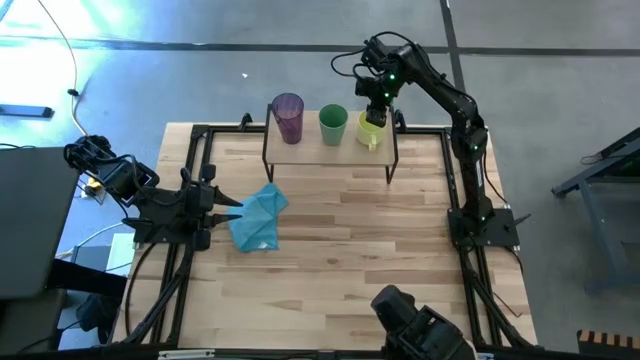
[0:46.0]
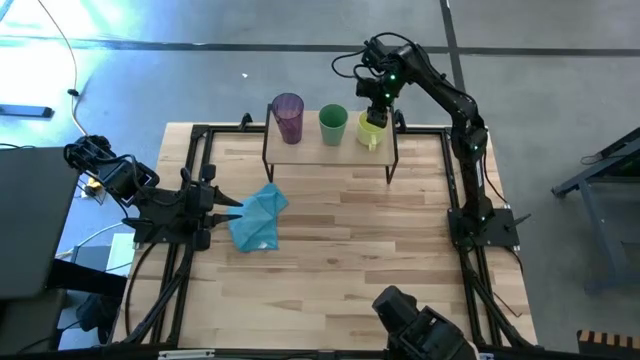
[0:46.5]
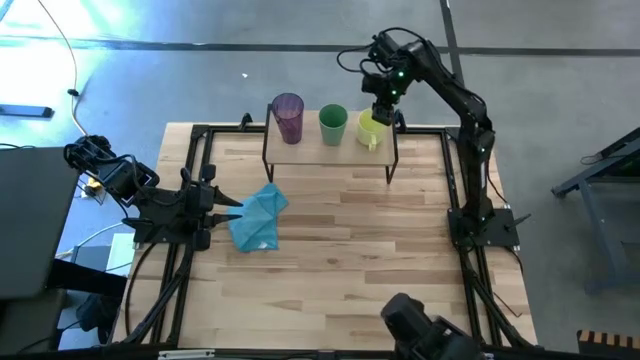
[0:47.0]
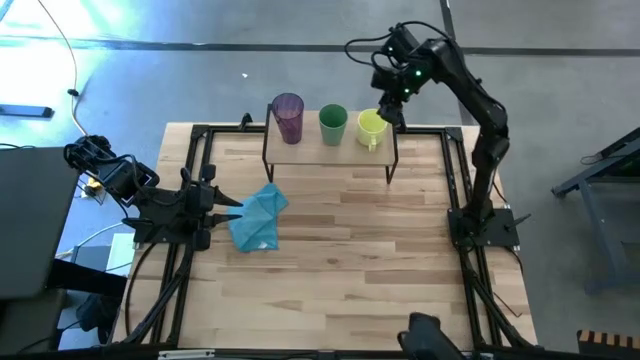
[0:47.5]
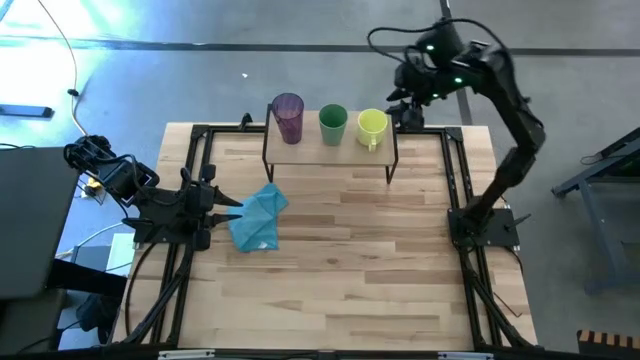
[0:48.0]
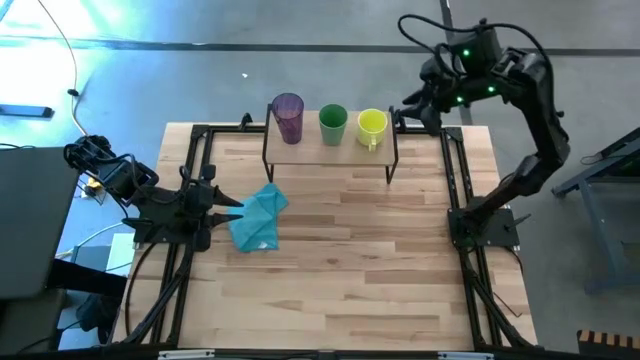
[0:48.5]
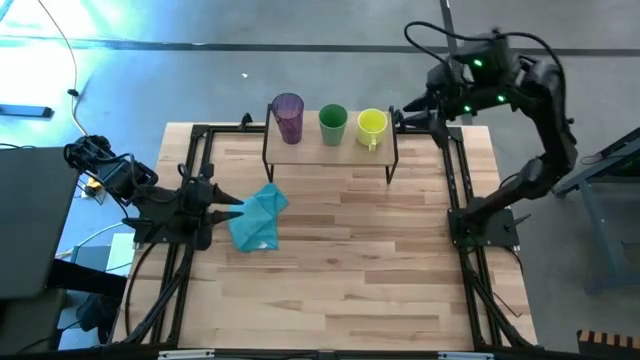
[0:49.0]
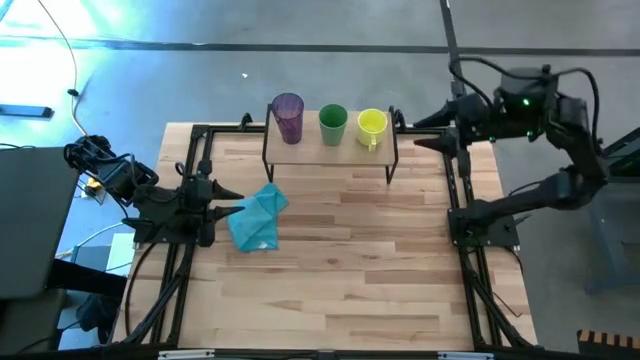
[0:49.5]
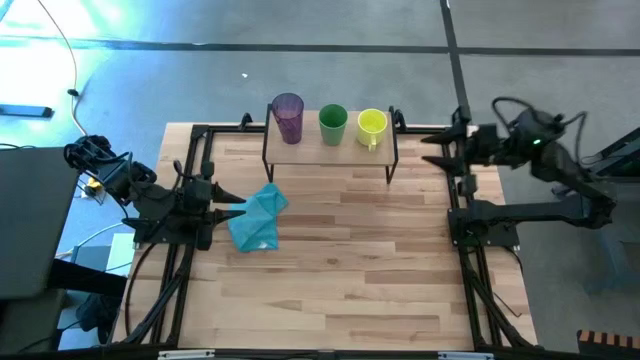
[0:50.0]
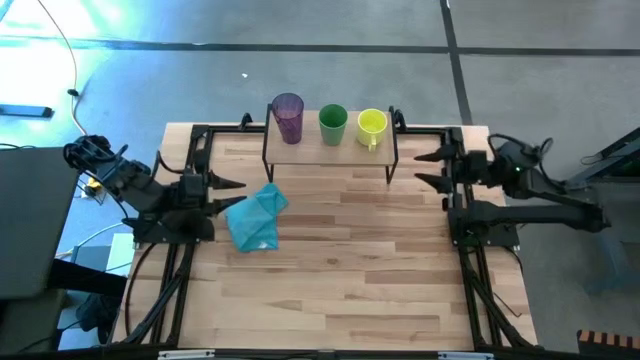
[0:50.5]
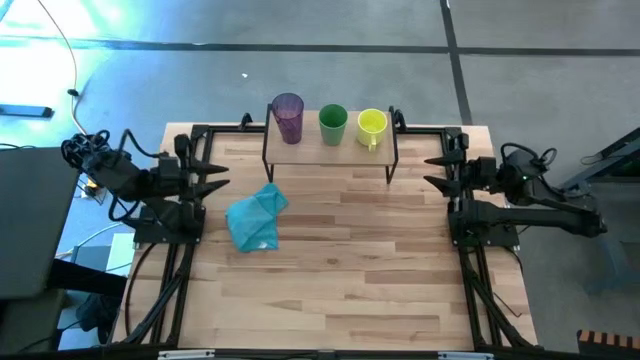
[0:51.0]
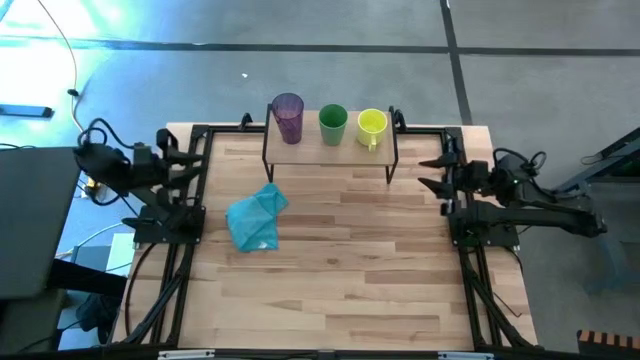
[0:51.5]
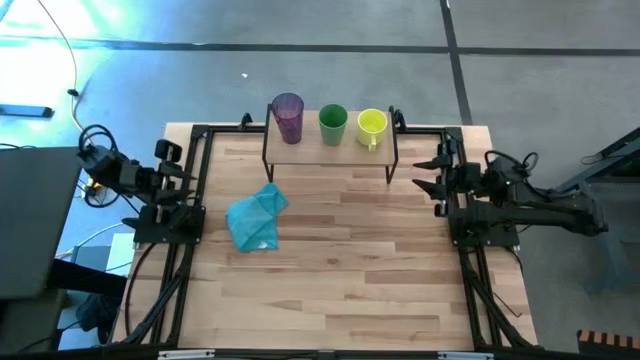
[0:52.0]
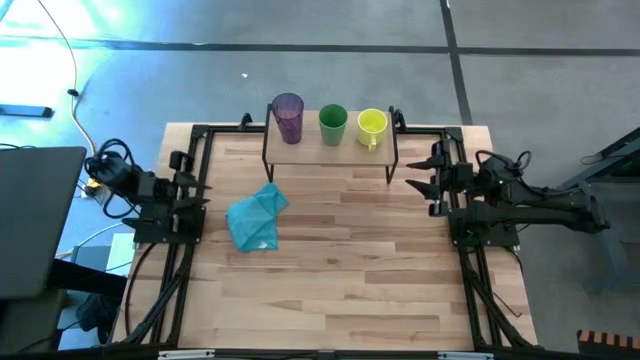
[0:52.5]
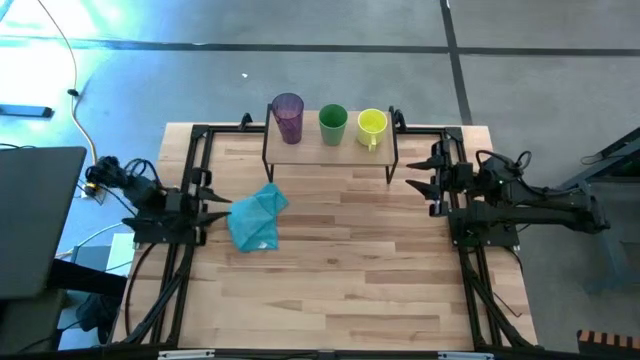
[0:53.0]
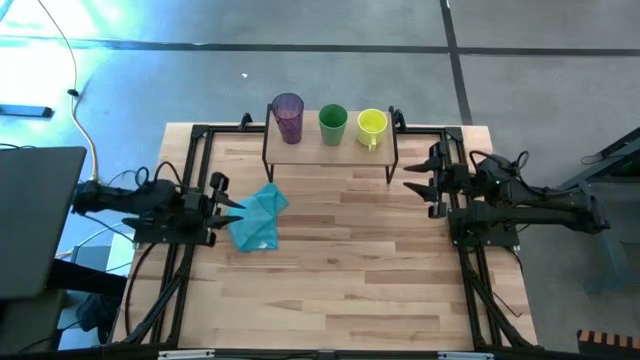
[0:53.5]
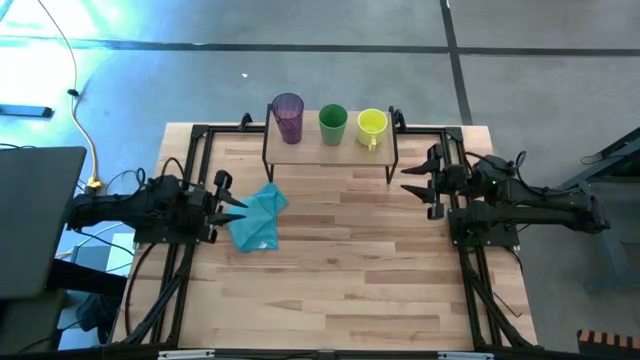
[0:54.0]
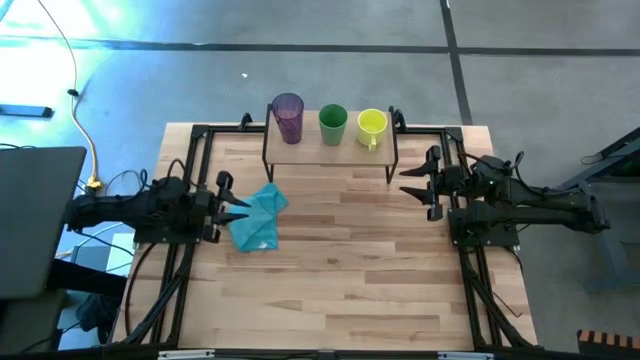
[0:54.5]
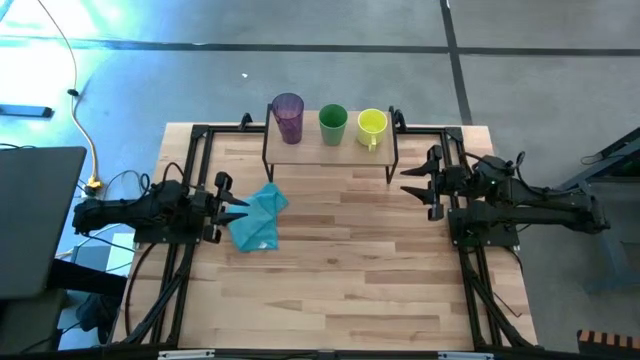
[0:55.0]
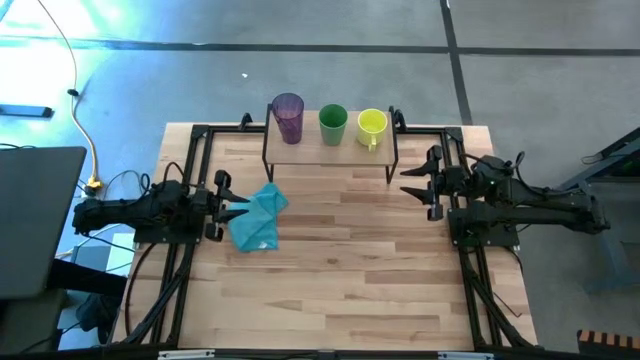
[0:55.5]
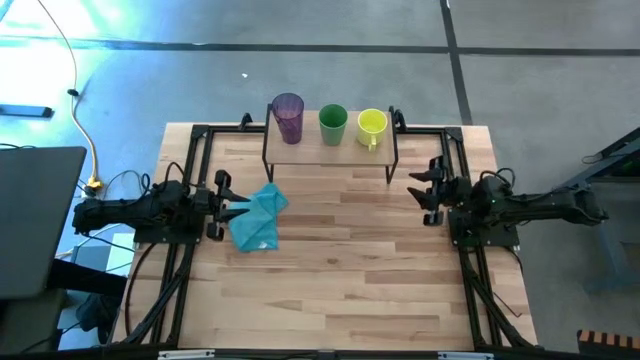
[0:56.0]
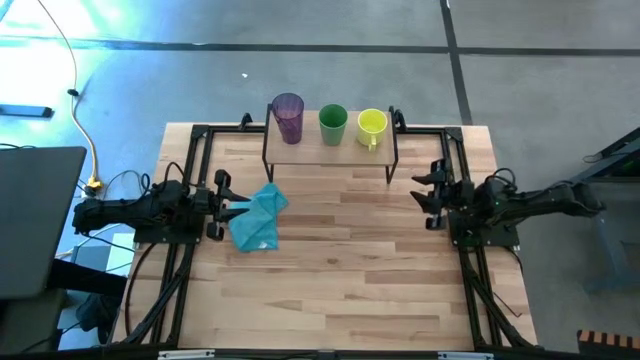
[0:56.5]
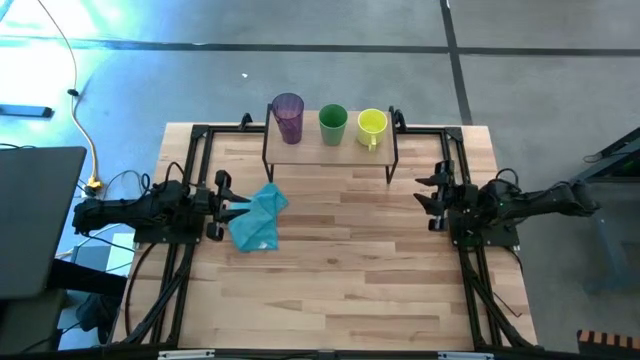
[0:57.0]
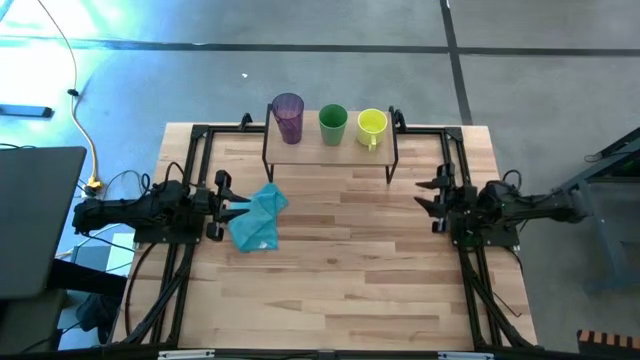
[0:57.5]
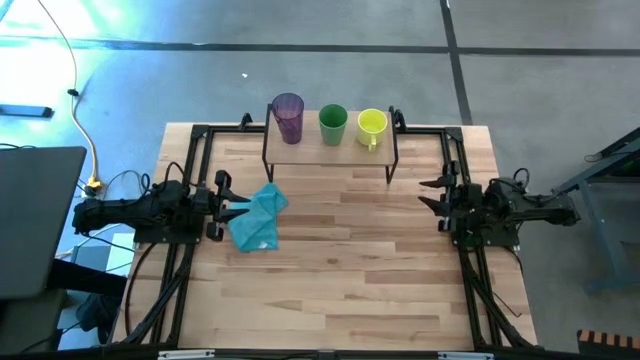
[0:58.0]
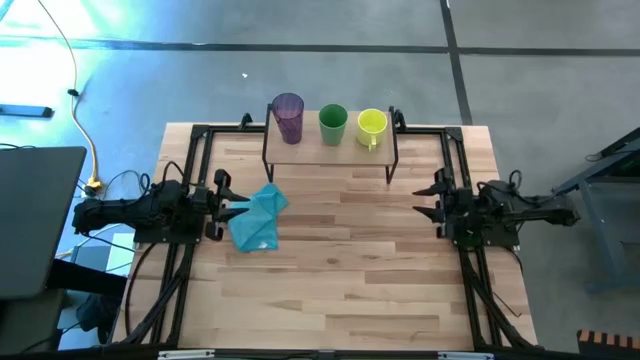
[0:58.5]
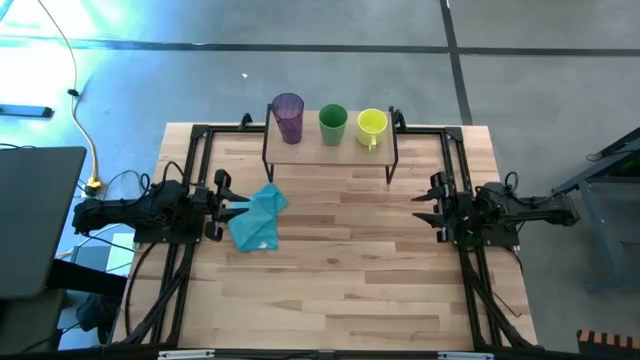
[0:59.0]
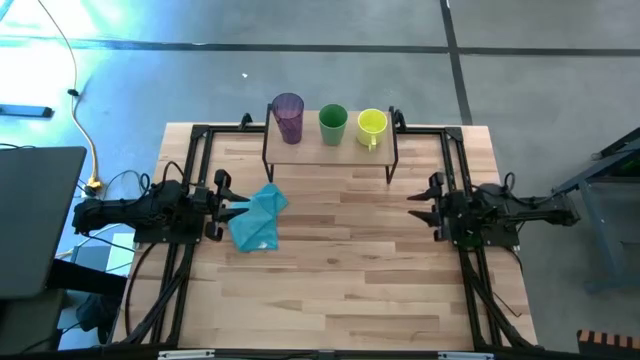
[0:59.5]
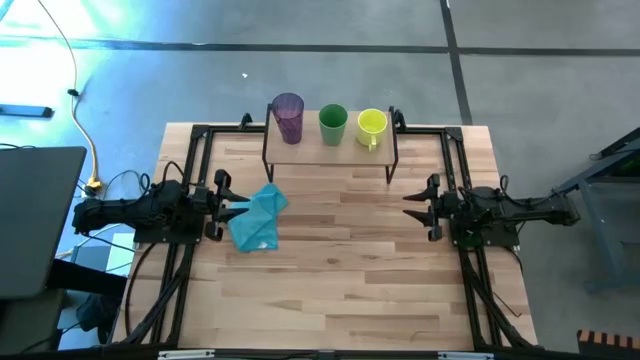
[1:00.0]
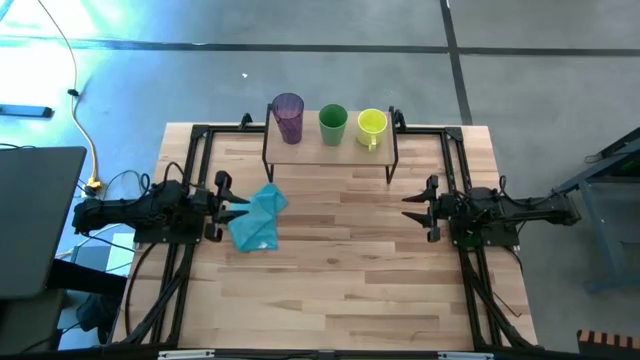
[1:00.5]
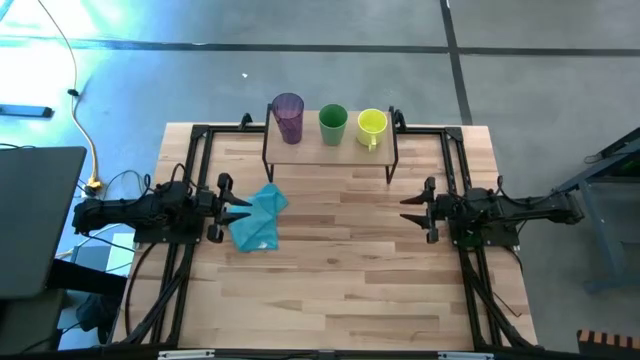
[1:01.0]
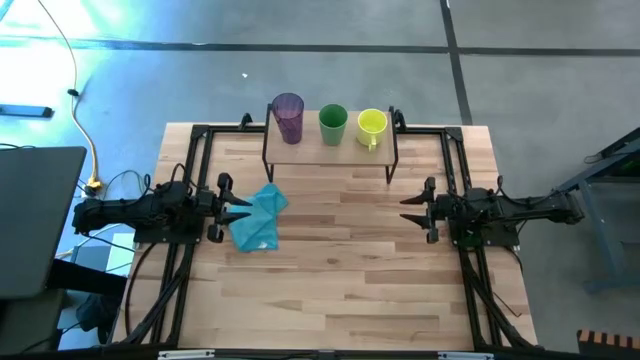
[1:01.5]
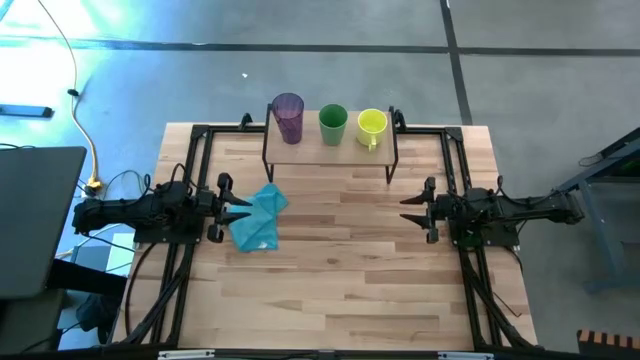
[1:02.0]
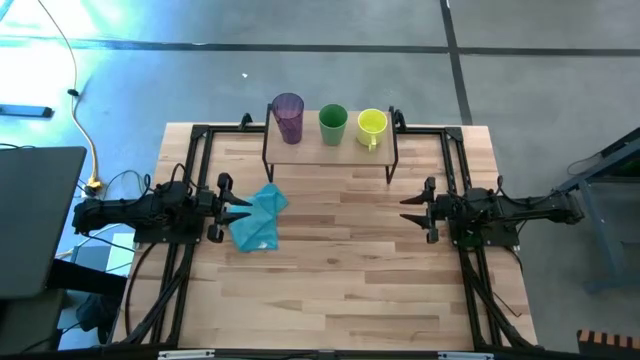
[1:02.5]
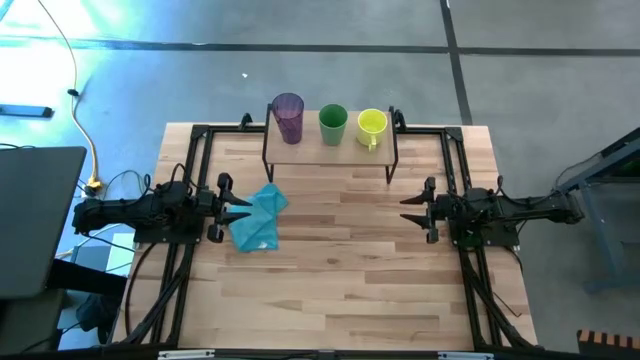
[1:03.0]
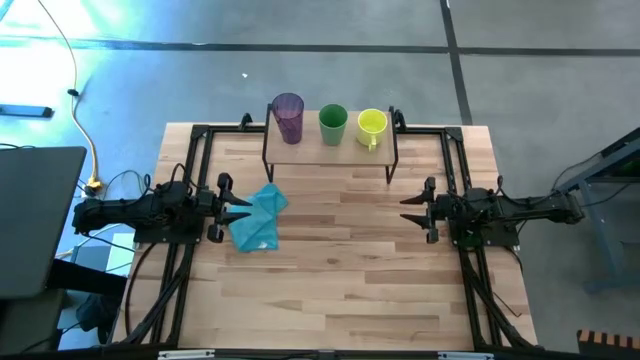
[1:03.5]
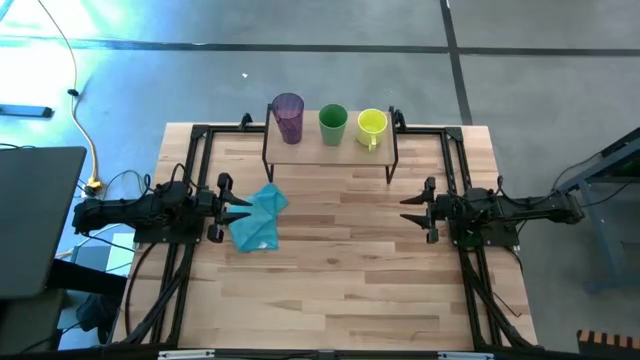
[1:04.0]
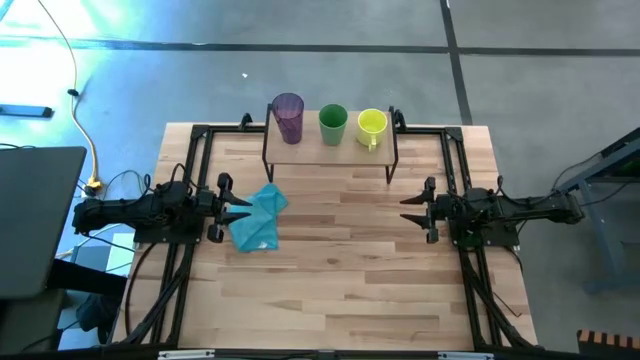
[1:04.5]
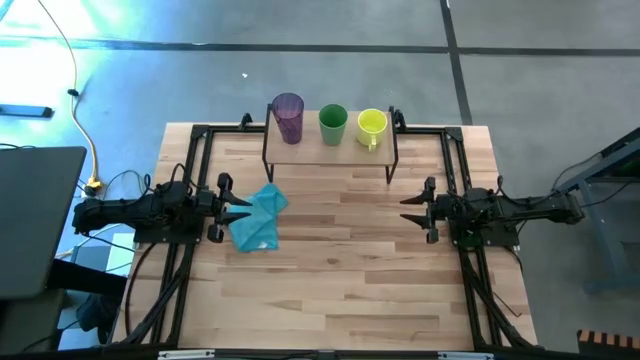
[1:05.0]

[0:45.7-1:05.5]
Task: Stack small to large cups/mugs on shelf
Return to Home Position

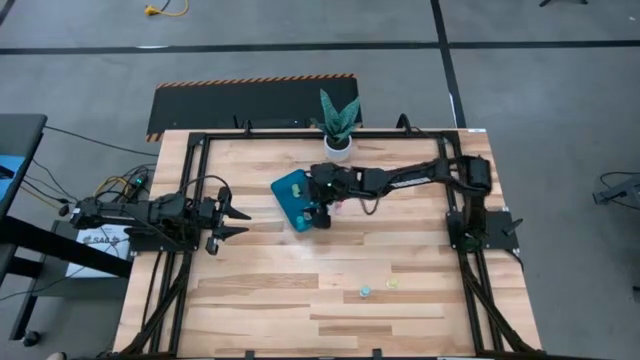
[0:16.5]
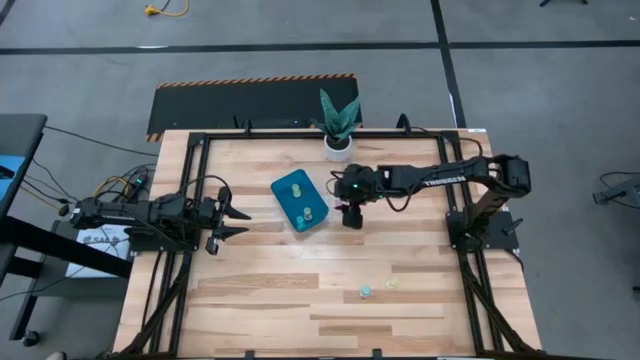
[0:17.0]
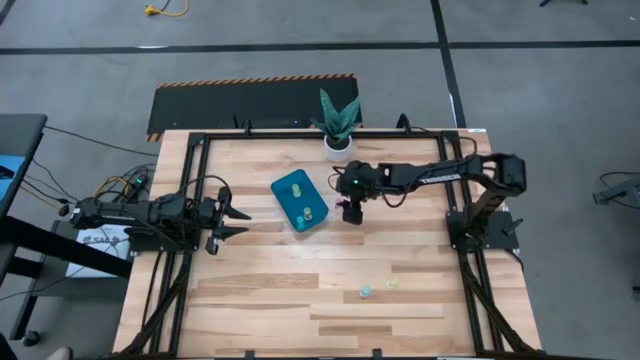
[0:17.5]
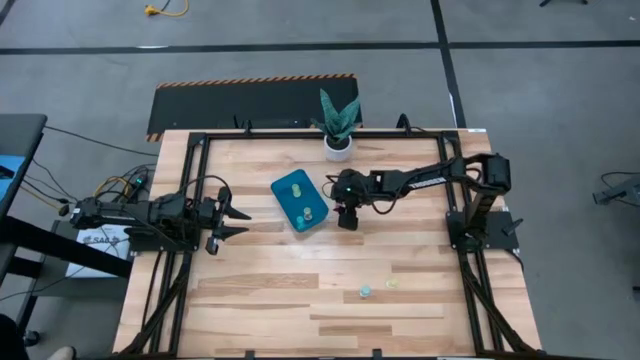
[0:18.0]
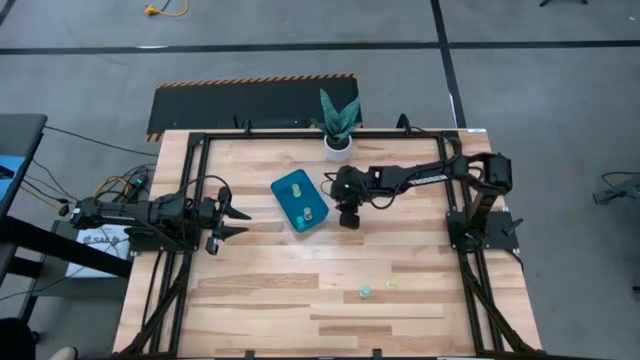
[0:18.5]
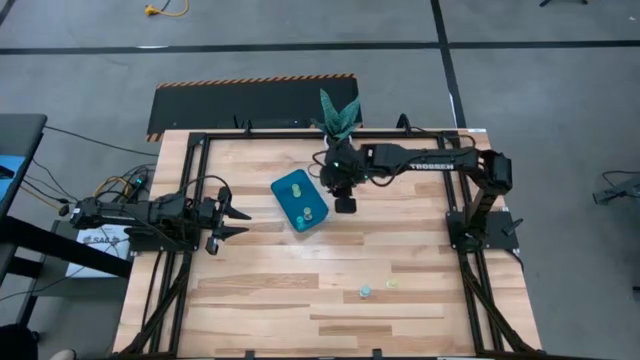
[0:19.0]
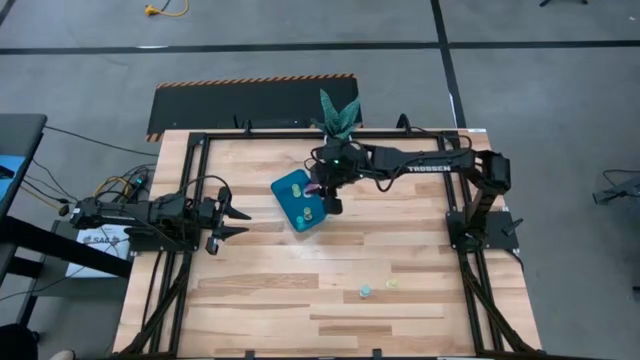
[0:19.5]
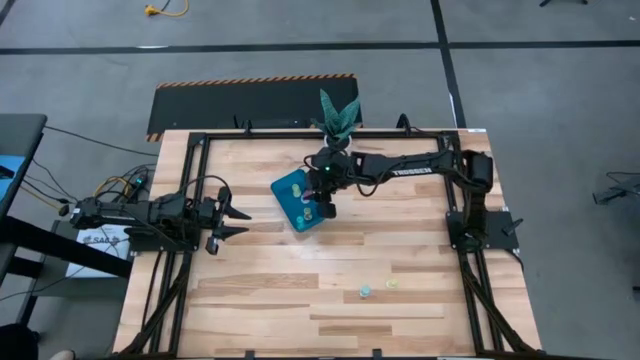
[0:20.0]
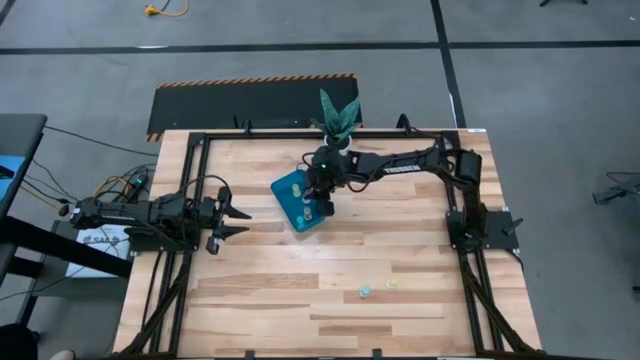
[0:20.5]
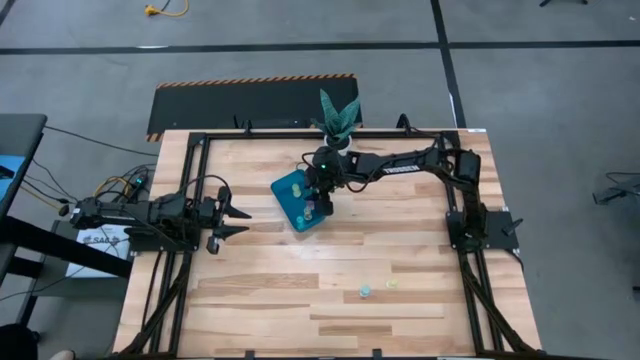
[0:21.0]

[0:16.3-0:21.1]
Task: Pick and place pill bottles into a basket
Put the pink medicine bottle into the blue bin
